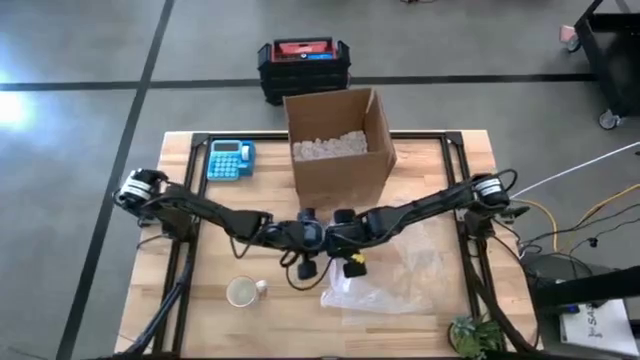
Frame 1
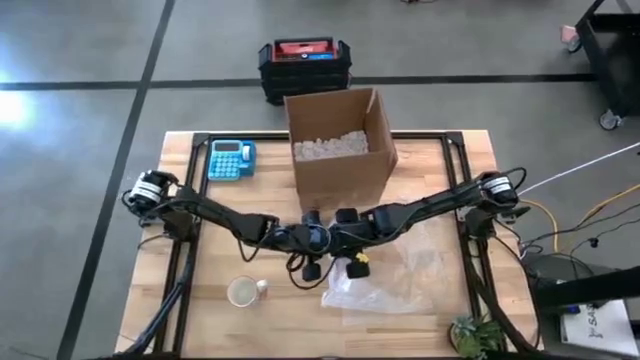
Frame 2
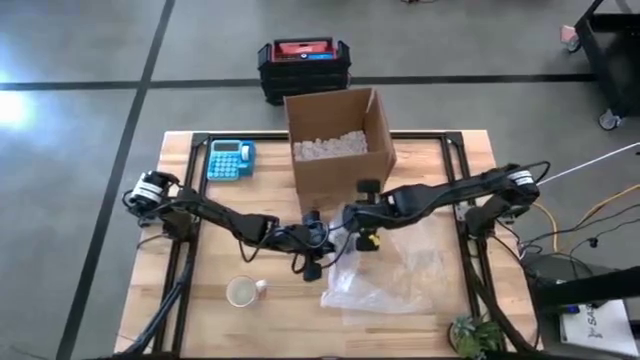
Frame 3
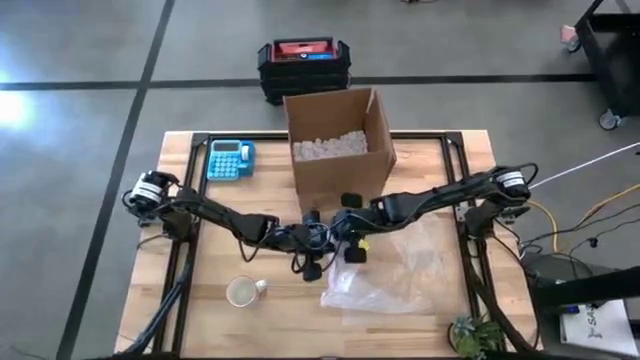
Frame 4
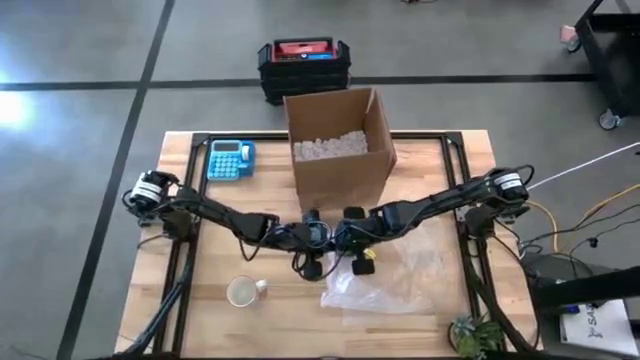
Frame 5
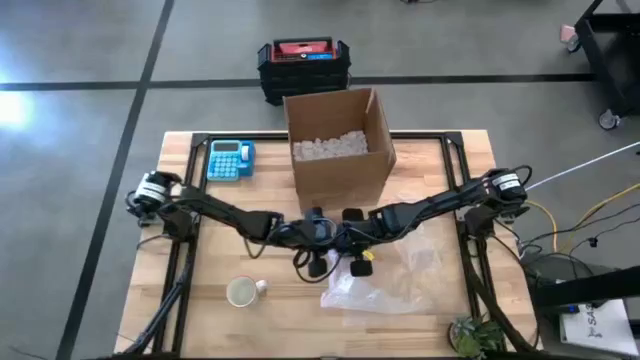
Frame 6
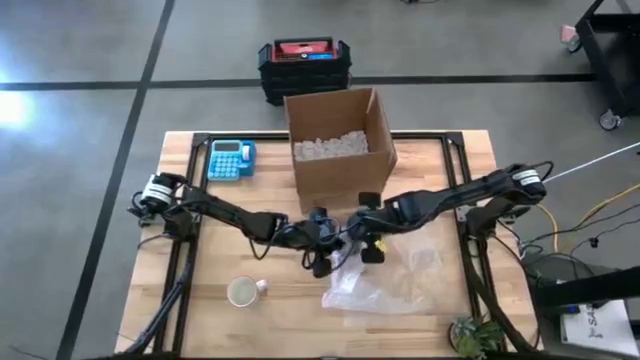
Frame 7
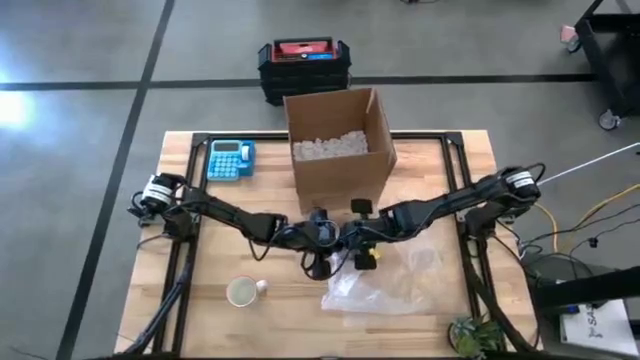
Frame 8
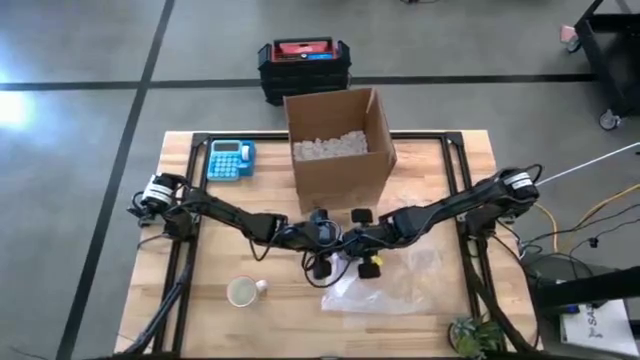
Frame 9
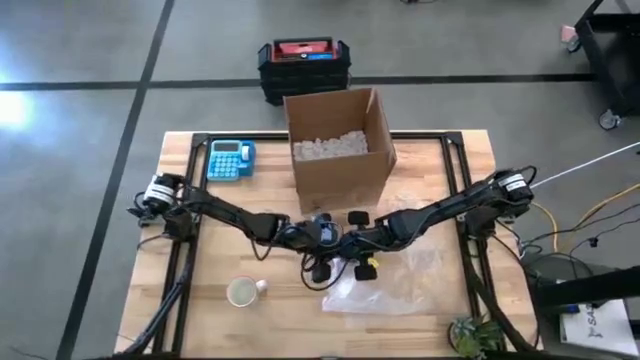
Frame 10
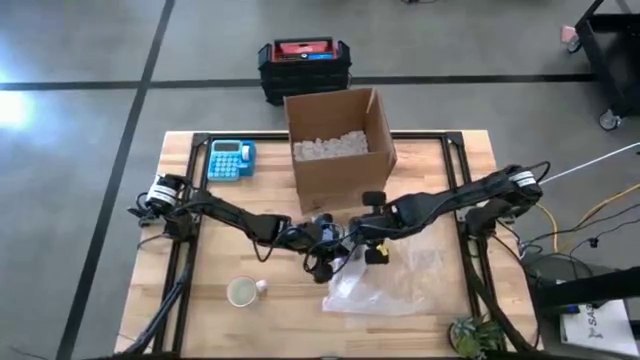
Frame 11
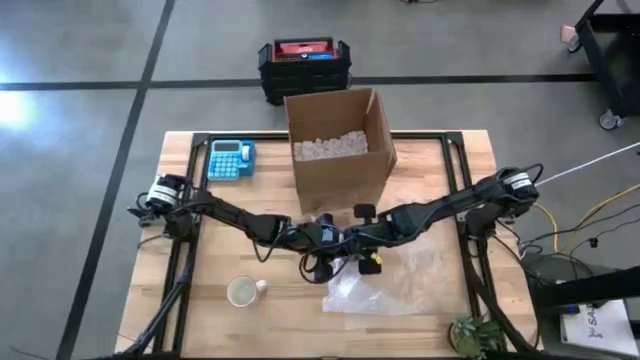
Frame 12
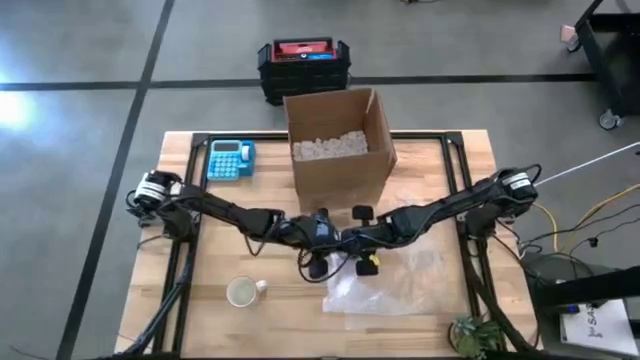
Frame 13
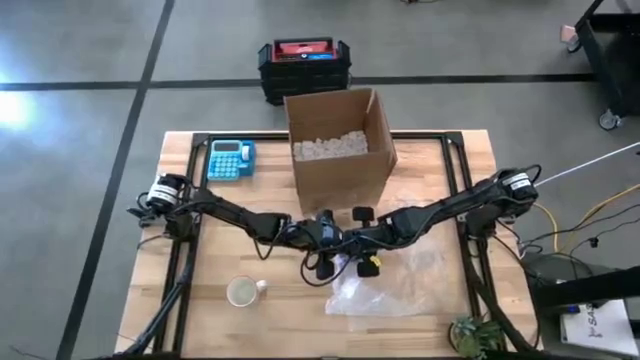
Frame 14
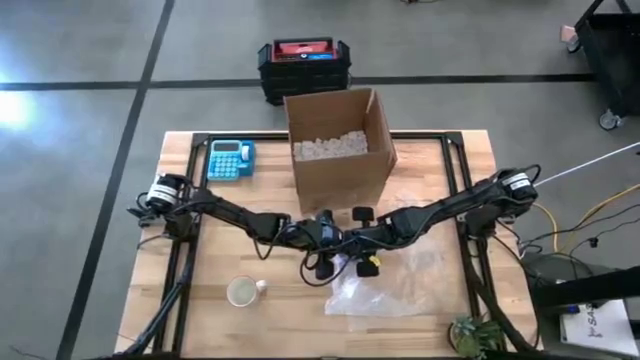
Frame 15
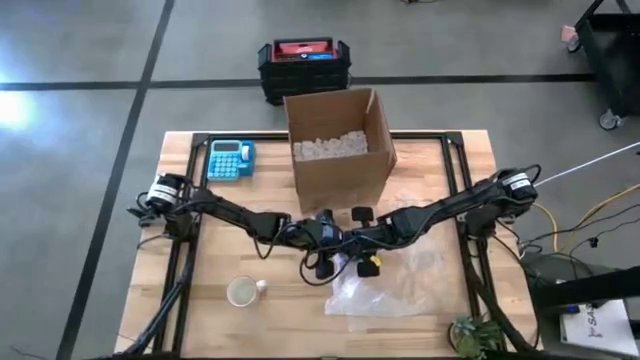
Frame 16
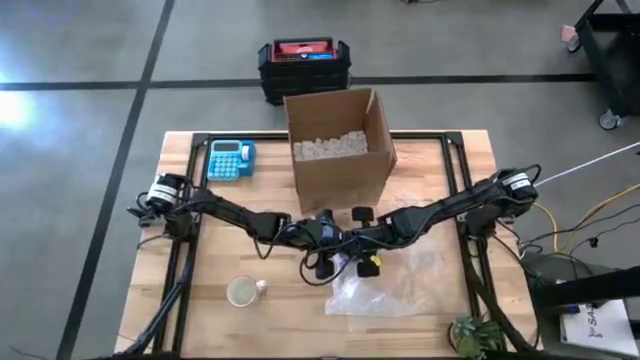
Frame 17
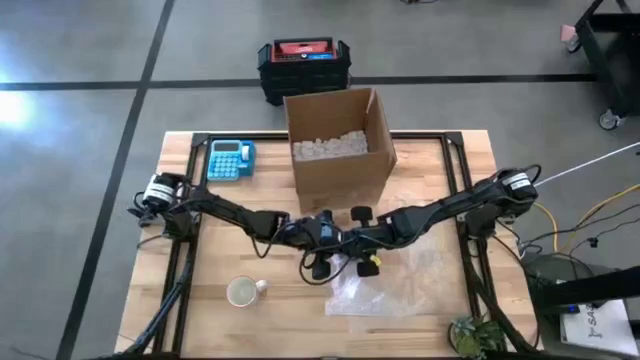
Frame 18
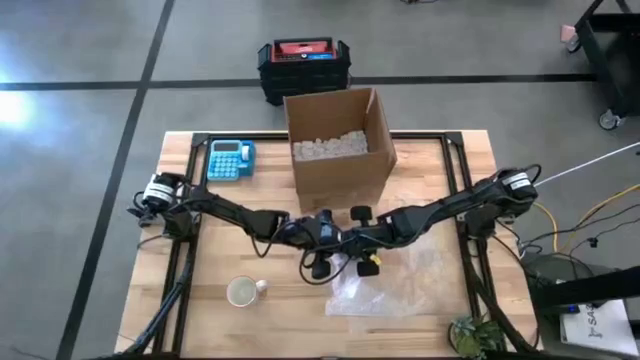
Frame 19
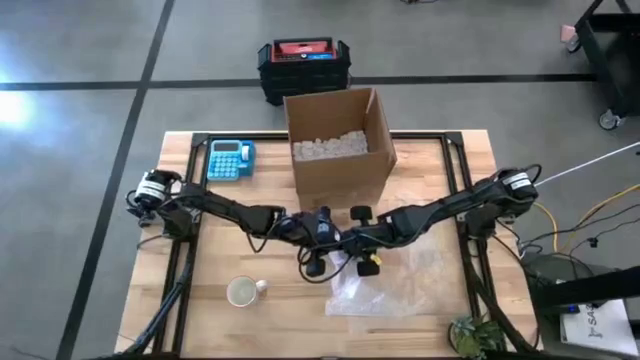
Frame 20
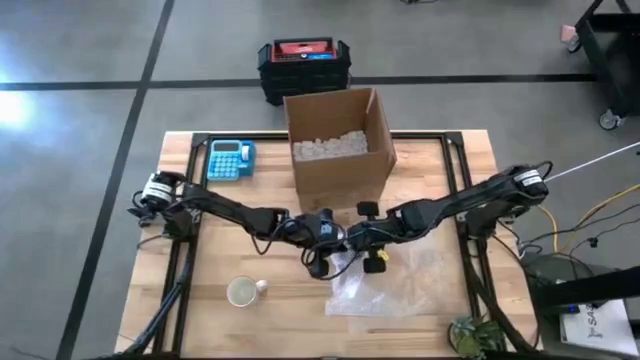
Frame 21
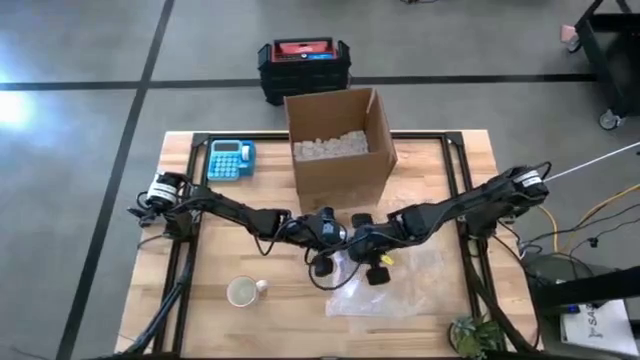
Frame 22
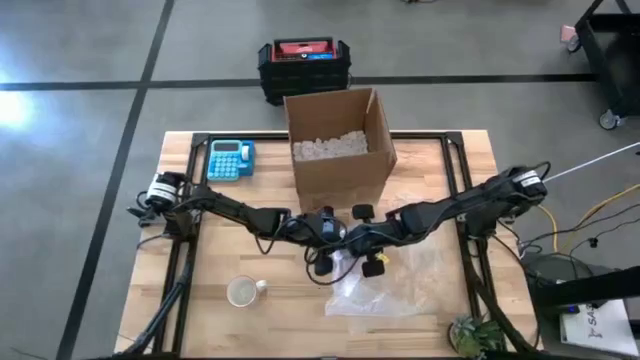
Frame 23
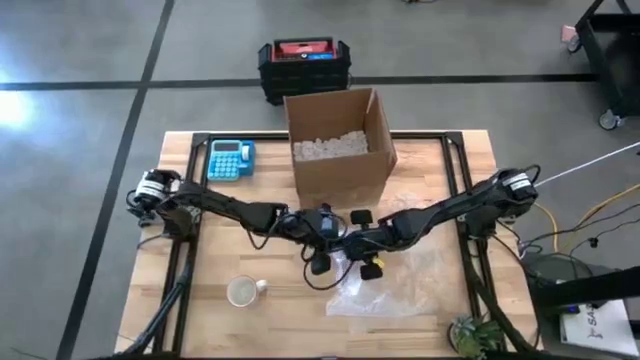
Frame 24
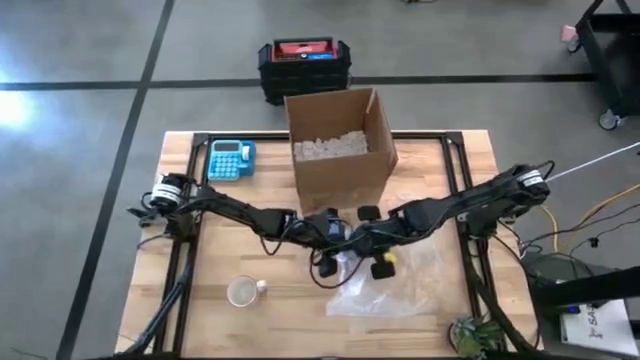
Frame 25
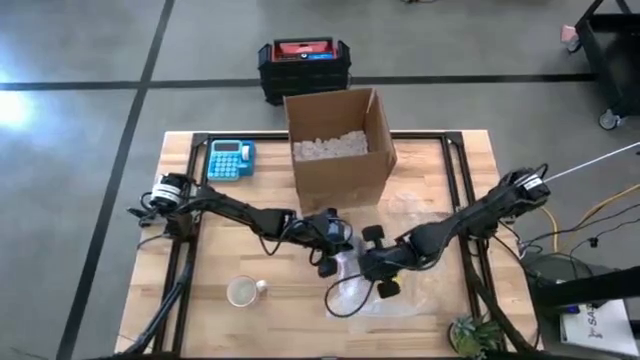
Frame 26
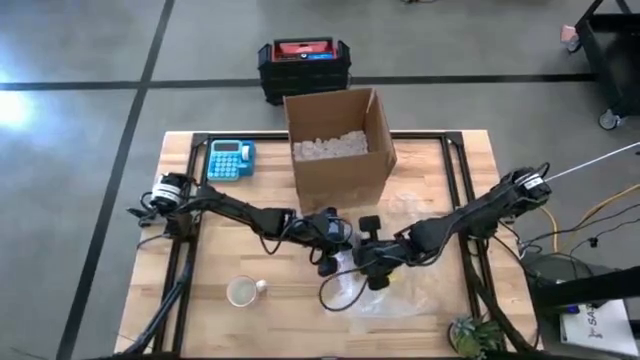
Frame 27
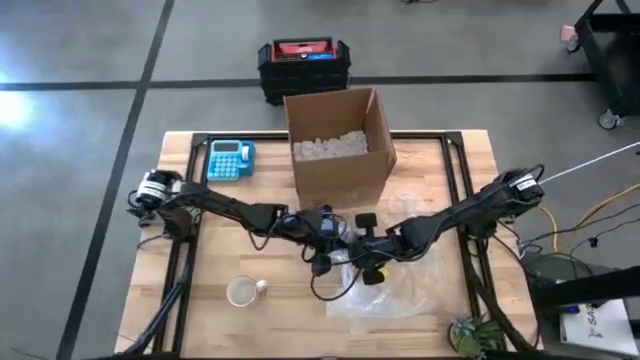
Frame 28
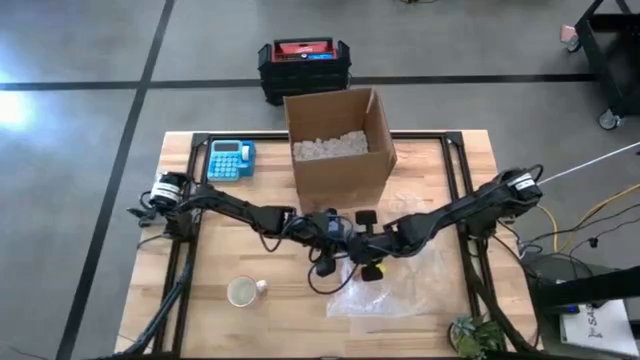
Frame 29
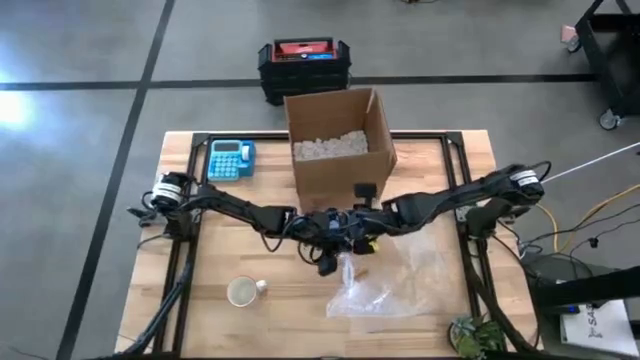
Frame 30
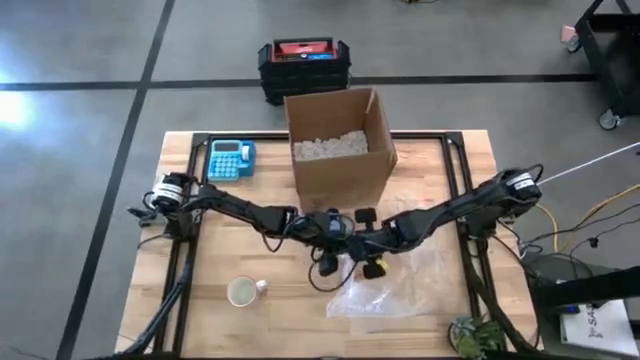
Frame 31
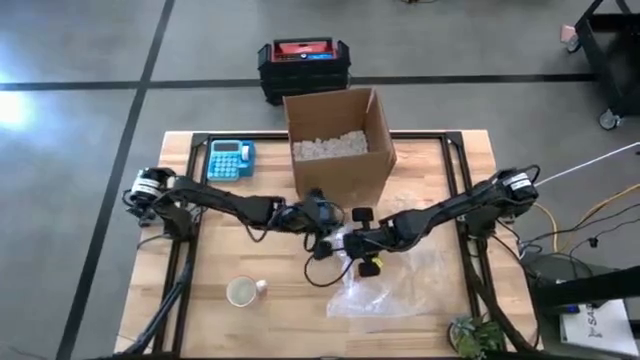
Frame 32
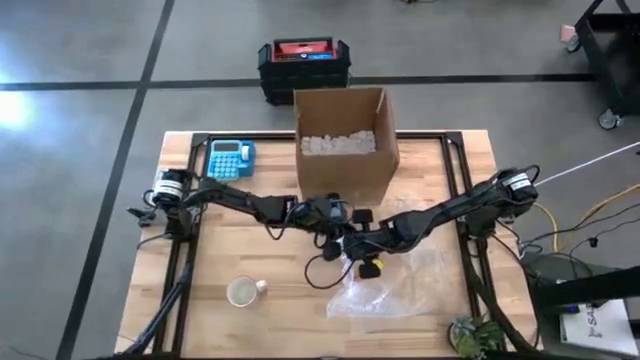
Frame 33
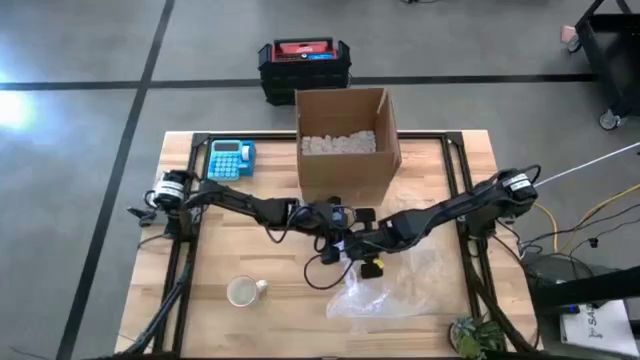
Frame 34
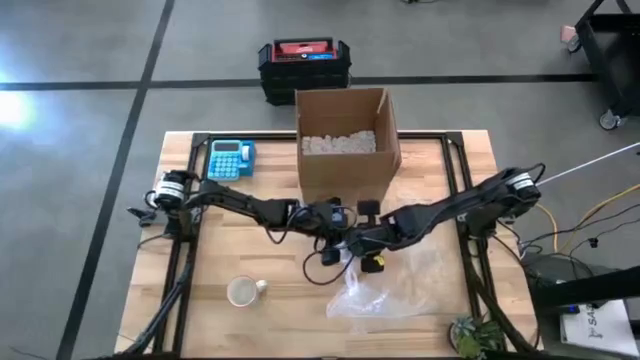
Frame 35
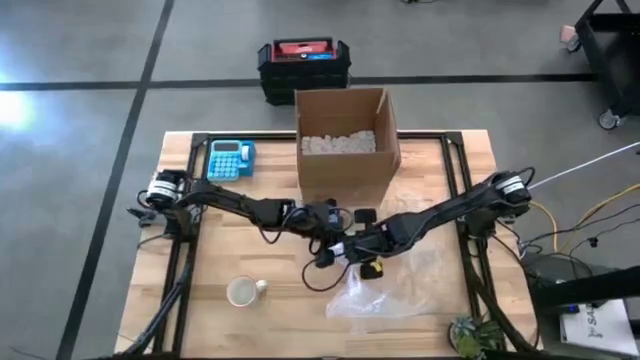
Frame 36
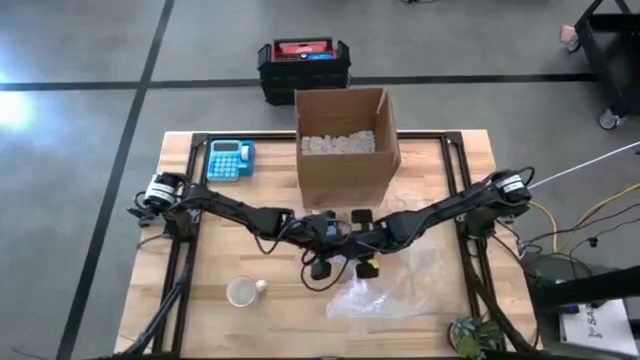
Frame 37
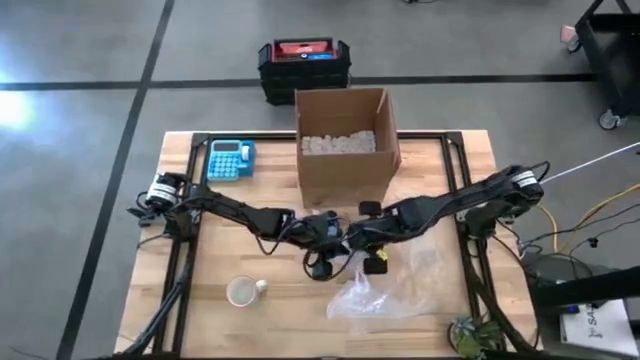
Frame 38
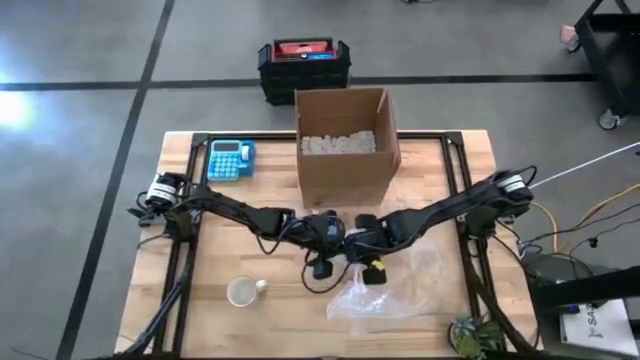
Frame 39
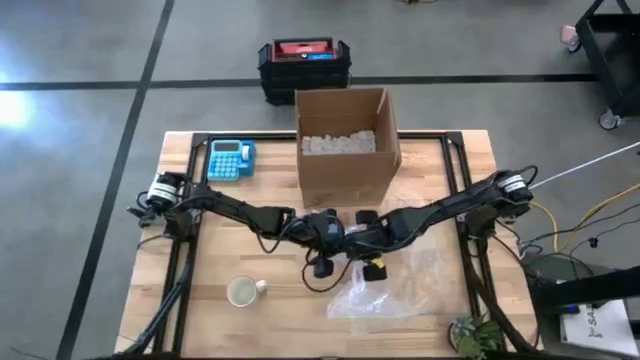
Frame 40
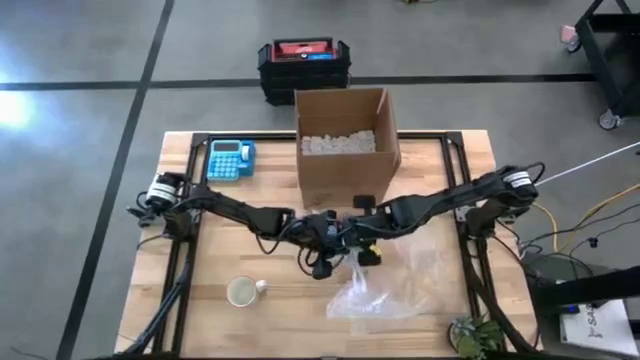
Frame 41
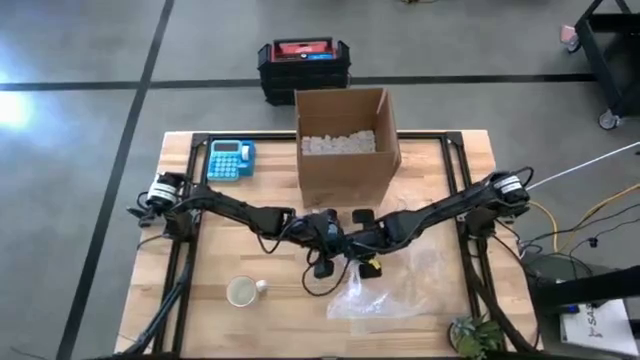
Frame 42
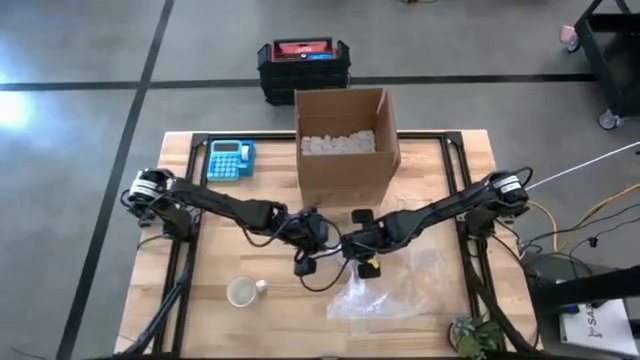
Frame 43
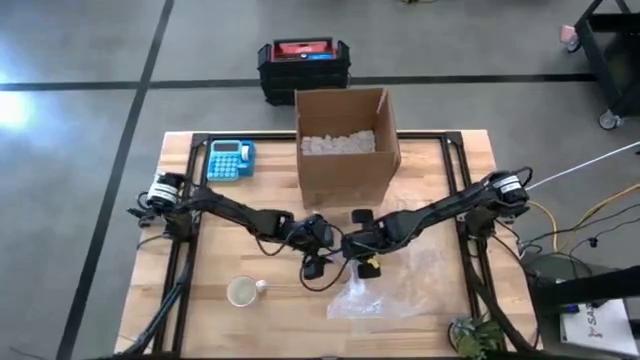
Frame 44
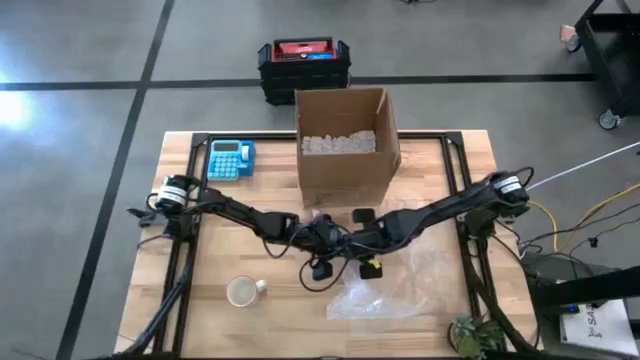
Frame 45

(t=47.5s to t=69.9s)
Task: wrap mug
Wrap the purple mug with bubble wrap
